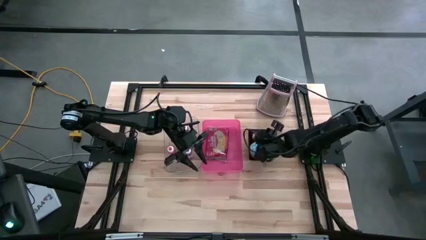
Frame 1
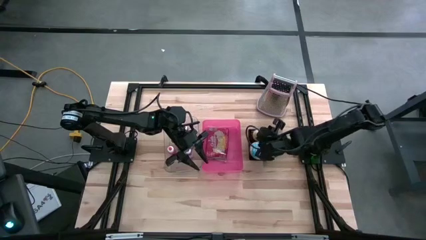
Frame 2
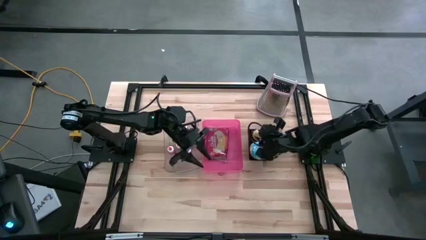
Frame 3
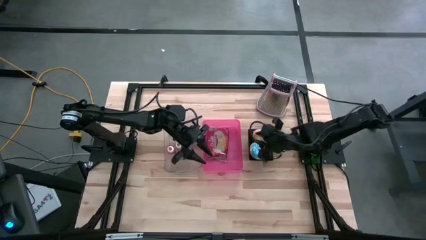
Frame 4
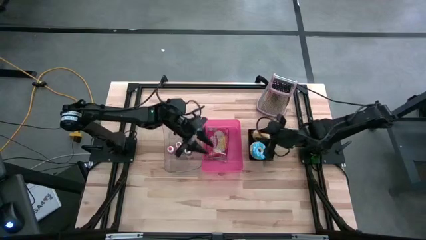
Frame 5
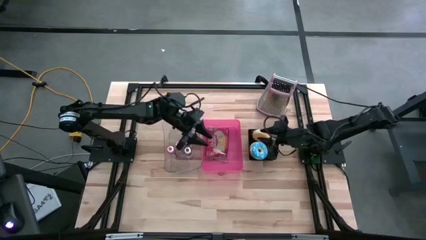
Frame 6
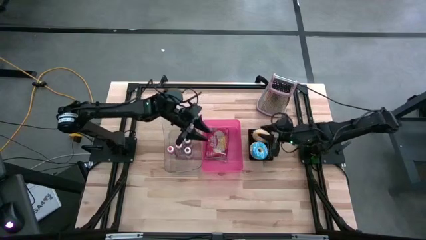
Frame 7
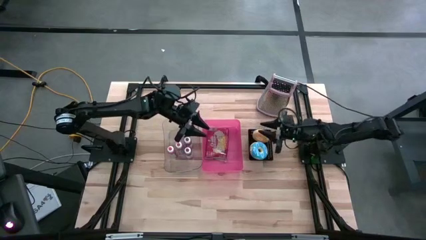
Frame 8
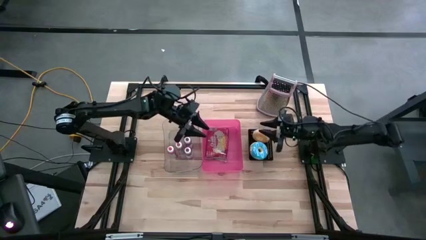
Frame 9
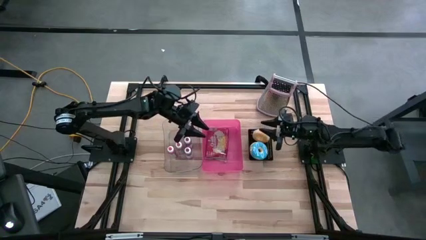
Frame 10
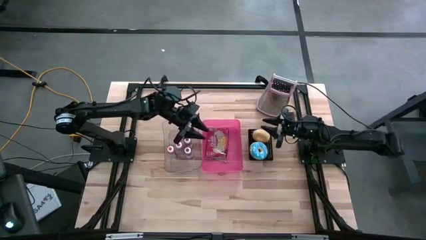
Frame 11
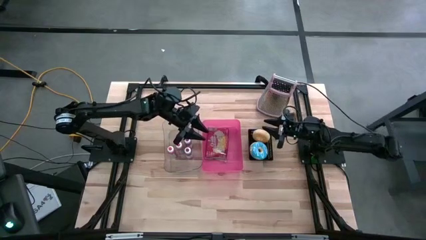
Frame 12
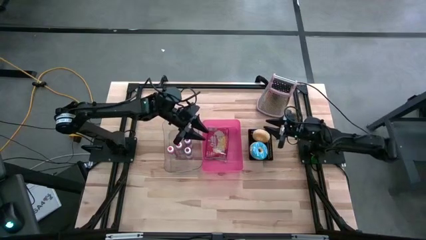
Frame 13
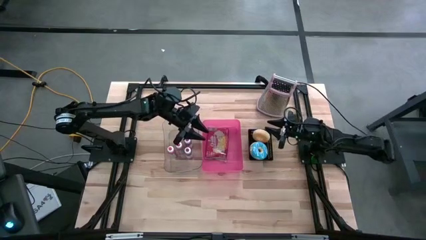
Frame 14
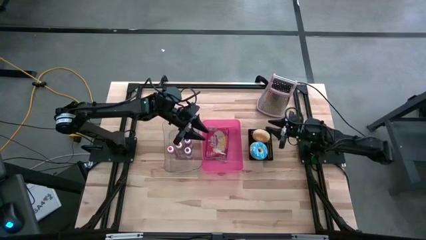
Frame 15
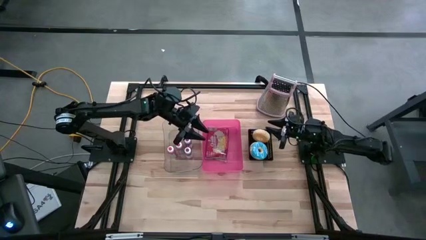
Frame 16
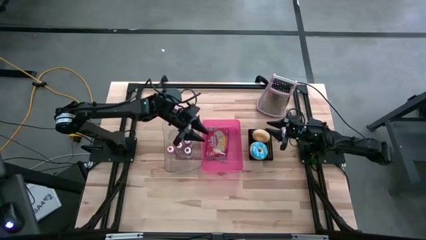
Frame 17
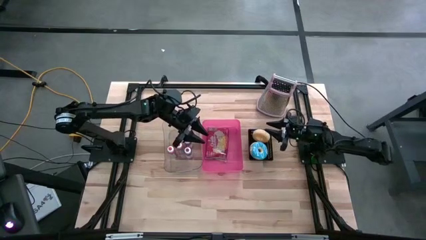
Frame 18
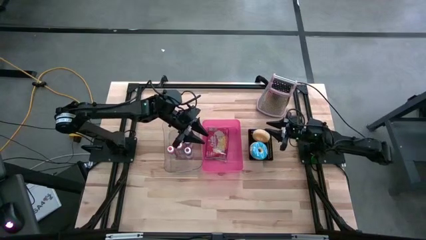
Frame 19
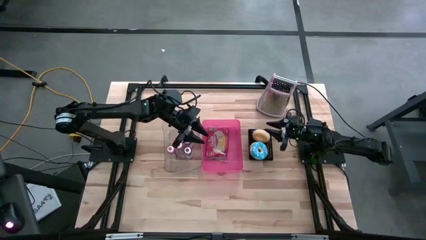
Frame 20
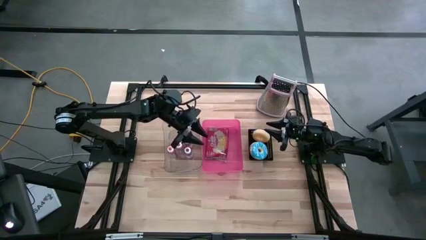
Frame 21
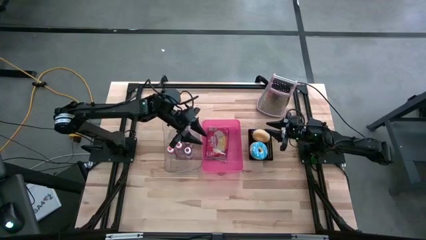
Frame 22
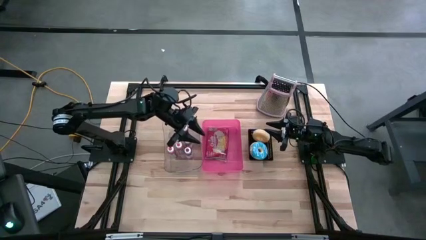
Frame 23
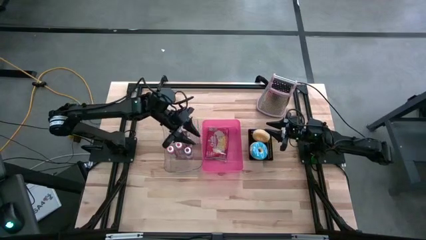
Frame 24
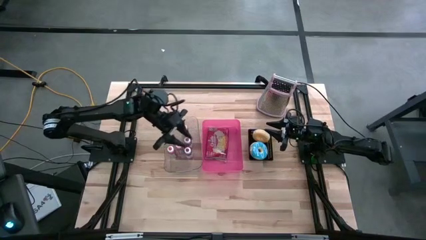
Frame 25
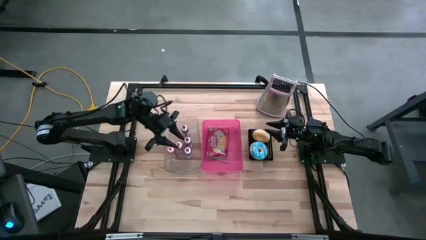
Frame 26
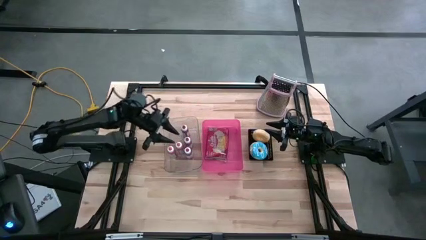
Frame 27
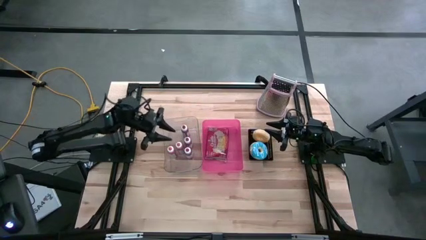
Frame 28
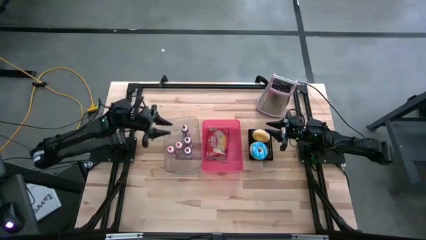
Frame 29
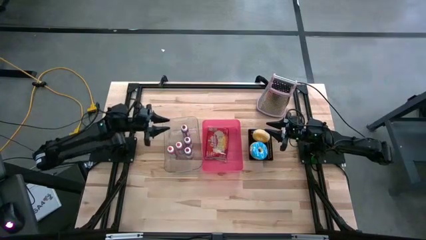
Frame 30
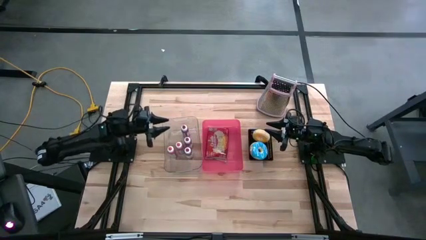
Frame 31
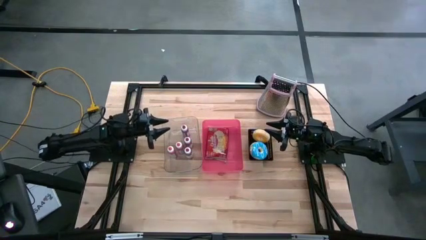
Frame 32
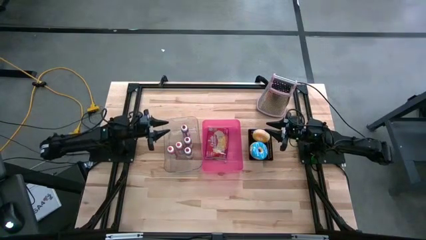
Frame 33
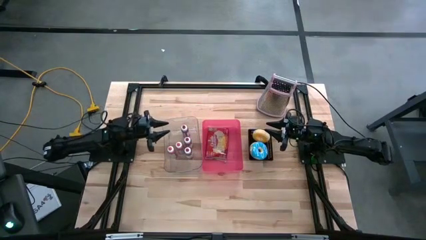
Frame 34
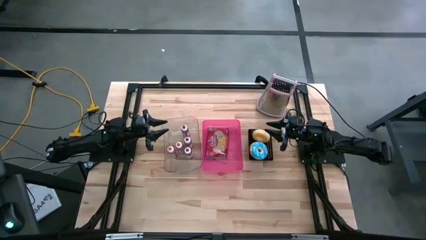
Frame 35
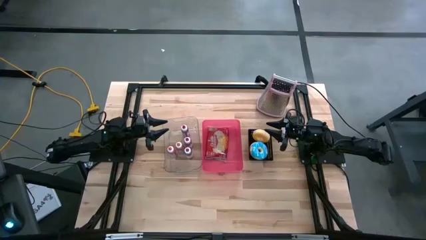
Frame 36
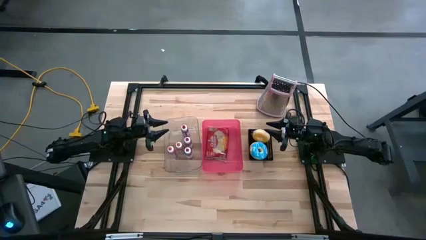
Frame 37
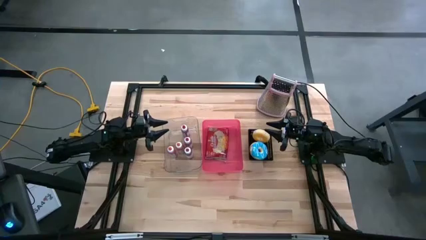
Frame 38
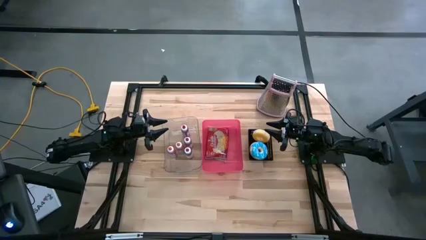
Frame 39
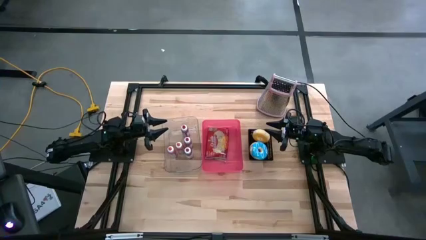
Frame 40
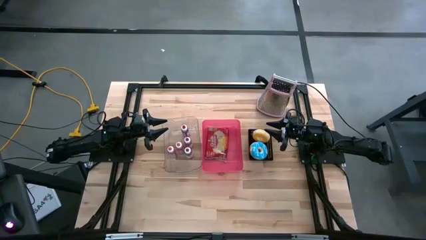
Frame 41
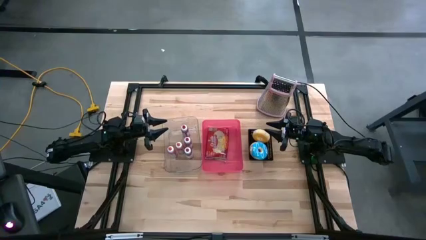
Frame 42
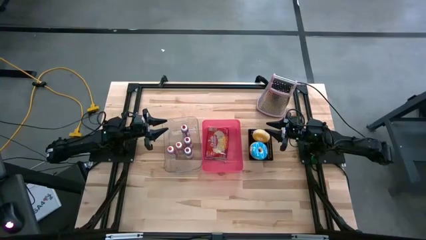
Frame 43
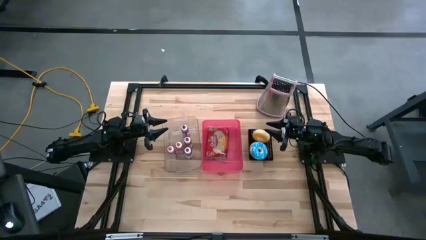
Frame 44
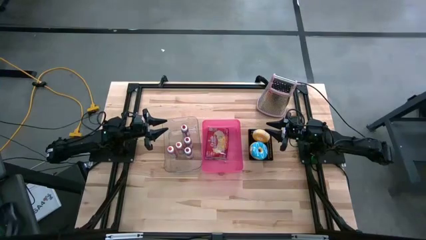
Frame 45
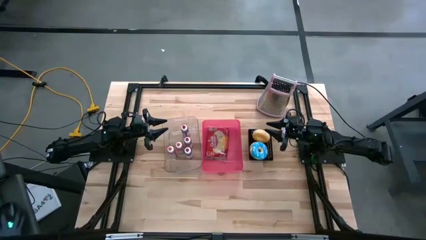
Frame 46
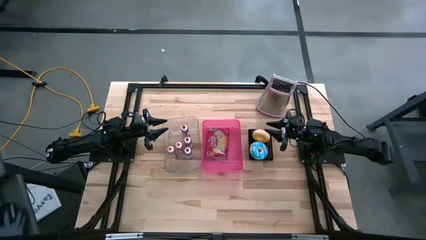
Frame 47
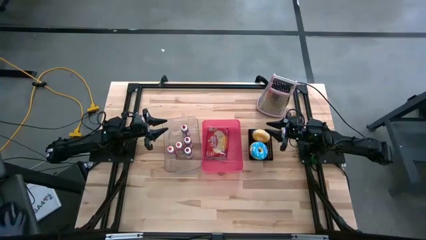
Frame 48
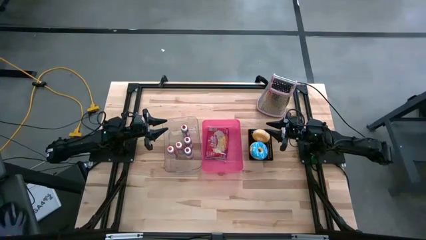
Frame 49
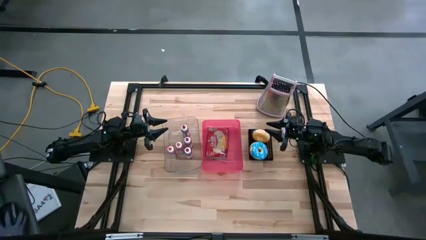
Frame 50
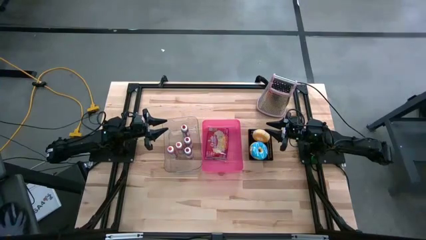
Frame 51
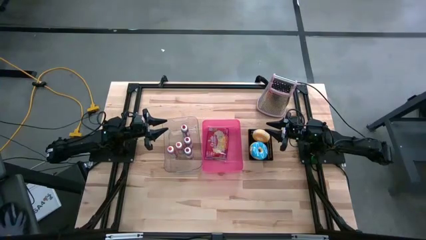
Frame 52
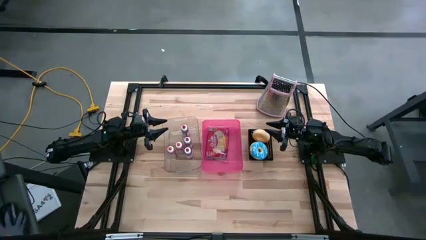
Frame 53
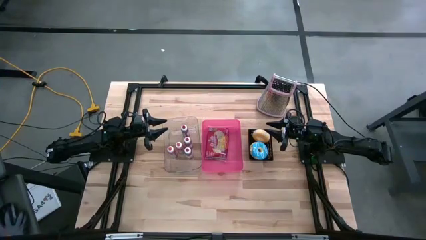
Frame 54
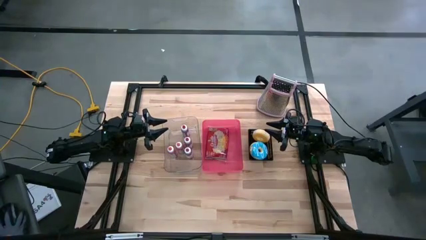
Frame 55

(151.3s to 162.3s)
Task: Pick & Place Food Item
Return to Home Position

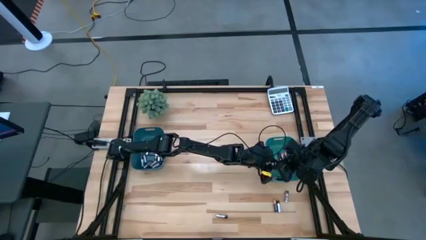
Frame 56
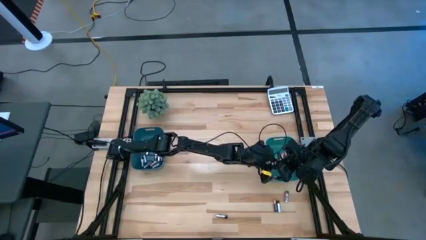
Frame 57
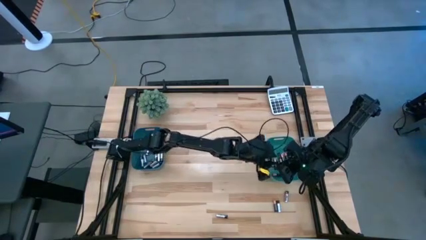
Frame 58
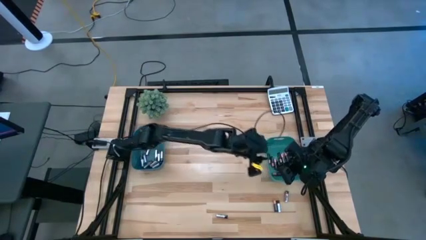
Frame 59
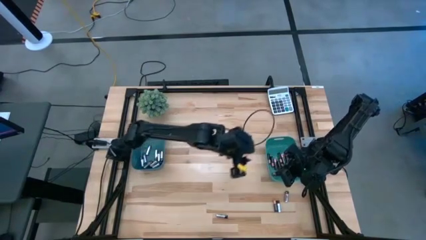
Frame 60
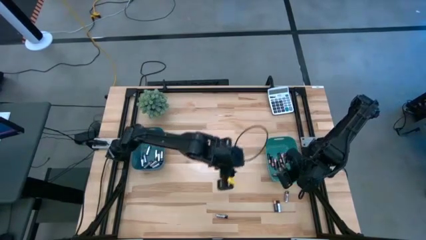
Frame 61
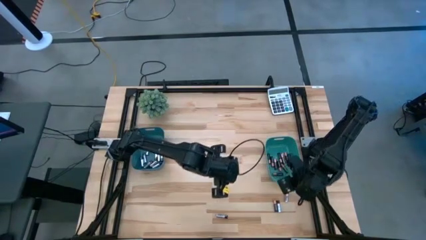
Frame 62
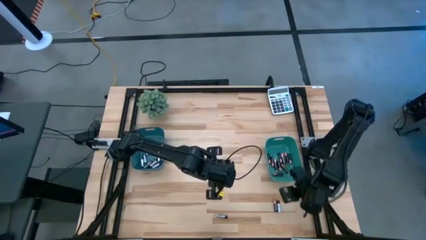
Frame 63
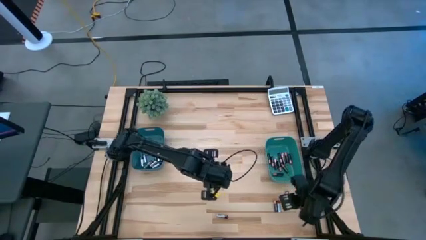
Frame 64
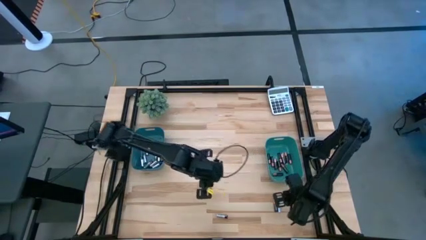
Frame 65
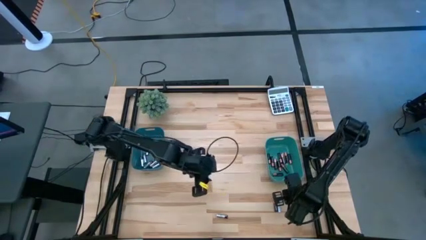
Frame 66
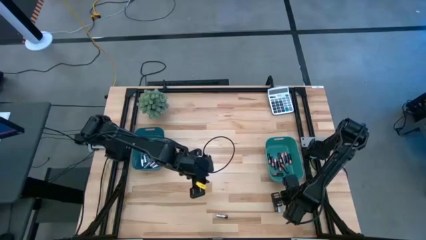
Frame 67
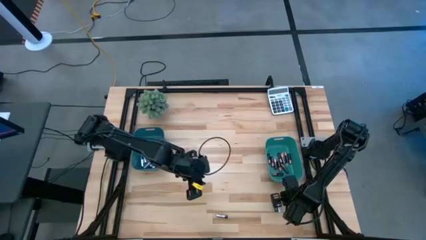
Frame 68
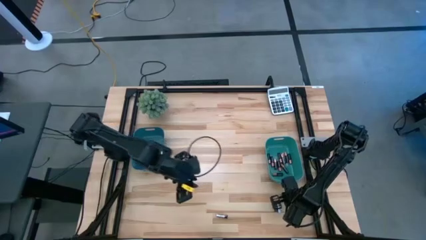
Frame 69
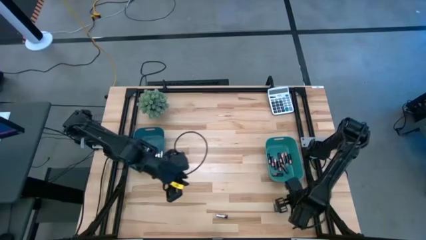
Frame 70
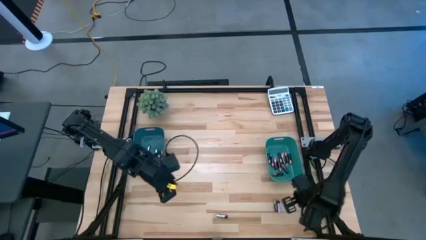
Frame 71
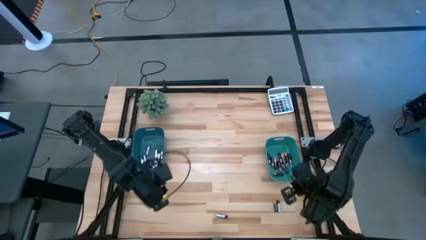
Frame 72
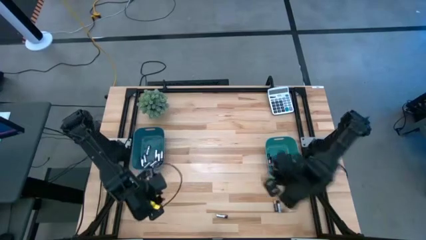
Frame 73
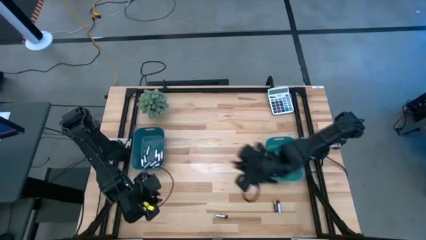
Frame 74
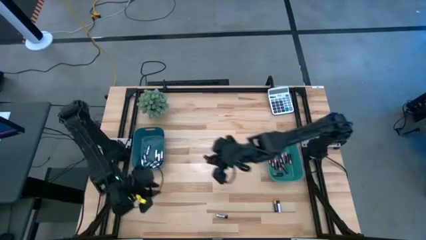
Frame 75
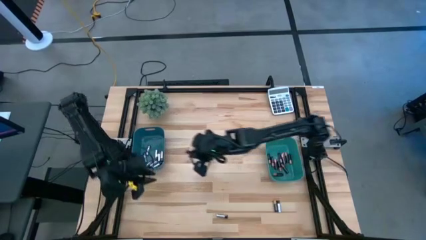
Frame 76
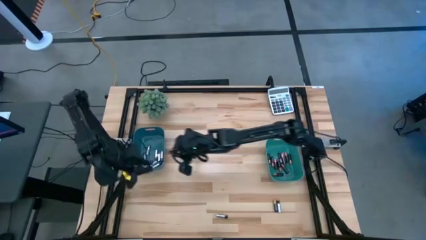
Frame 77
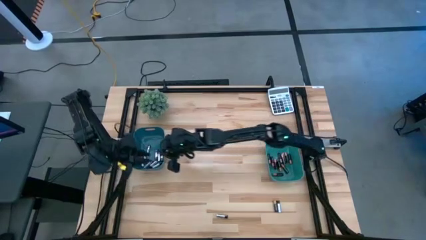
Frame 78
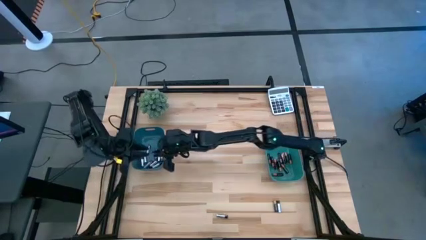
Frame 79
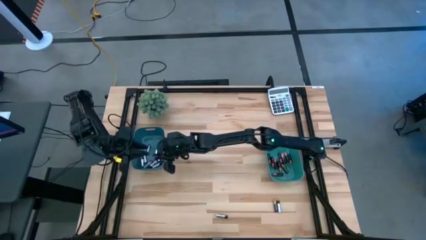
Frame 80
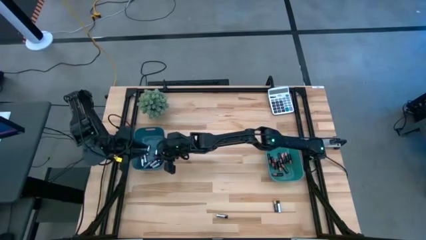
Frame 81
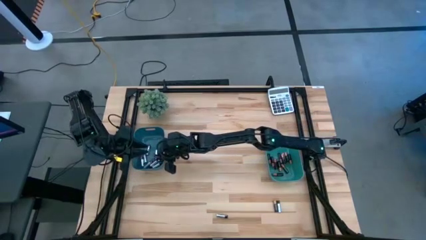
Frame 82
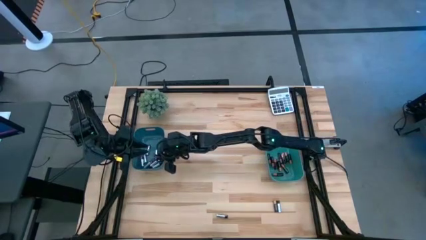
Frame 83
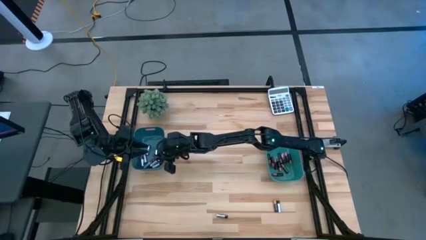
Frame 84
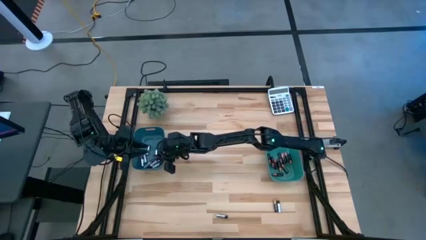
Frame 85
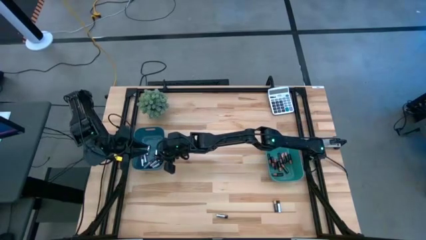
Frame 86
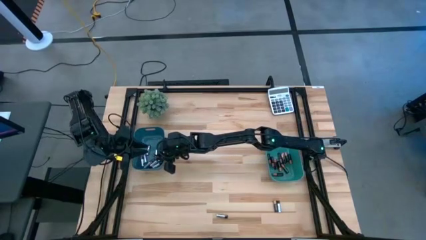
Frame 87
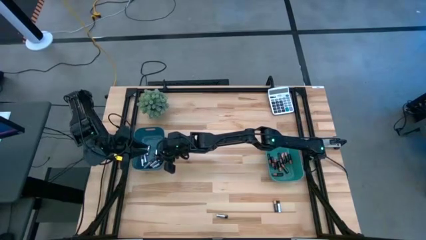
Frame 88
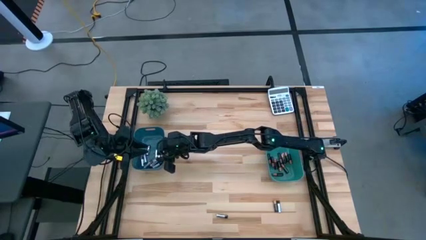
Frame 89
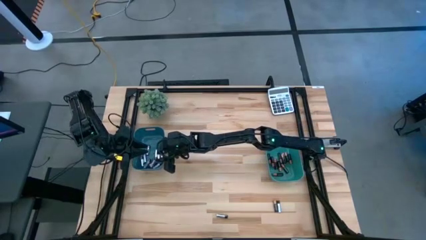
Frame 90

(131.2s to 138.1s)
Task: Sort batteries
Put the silver battery into the blue bin
